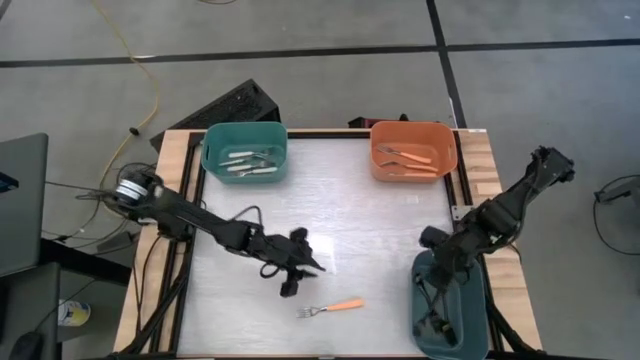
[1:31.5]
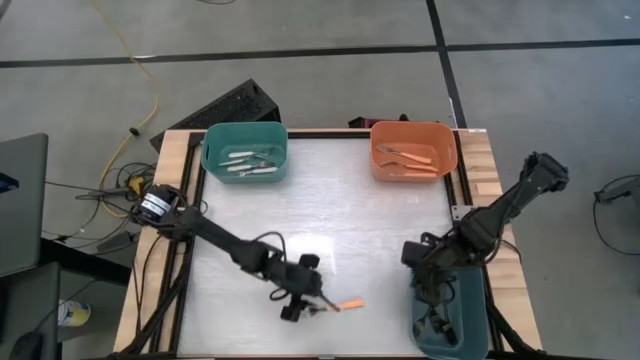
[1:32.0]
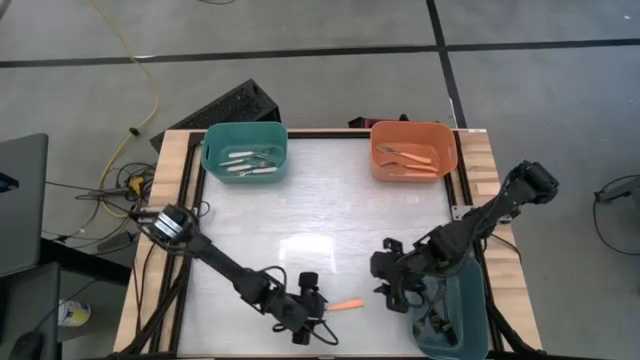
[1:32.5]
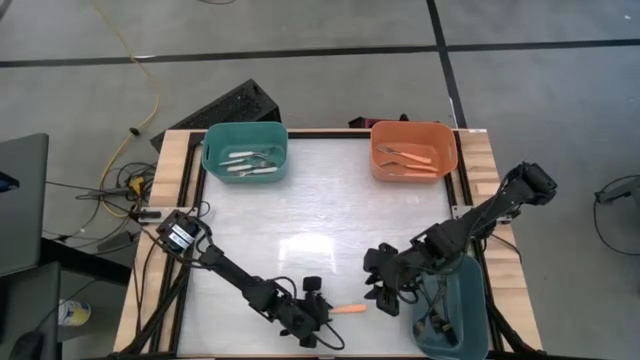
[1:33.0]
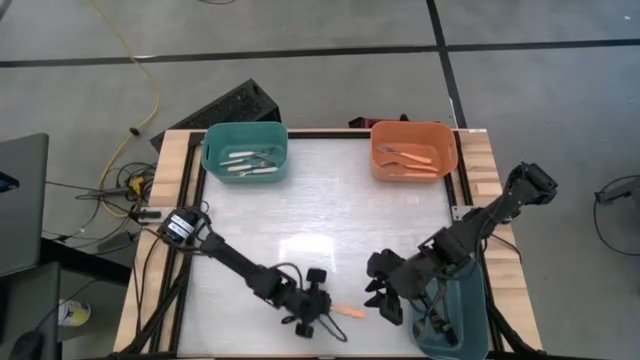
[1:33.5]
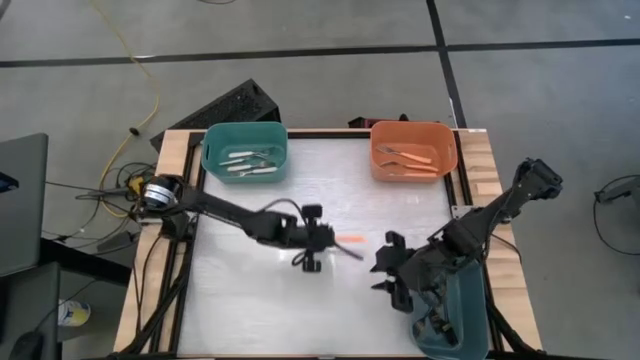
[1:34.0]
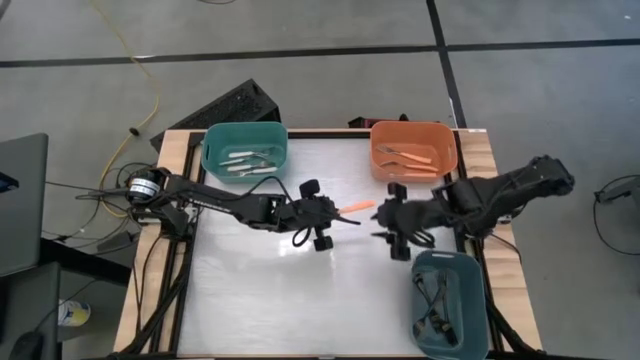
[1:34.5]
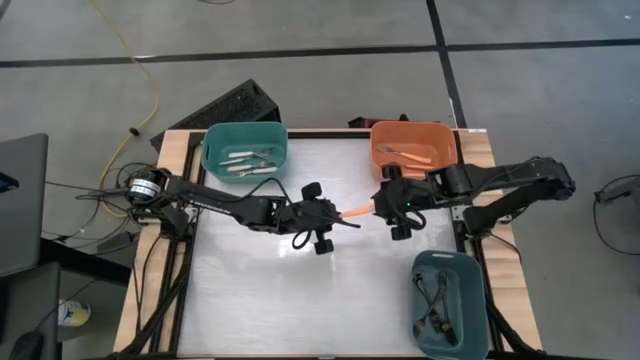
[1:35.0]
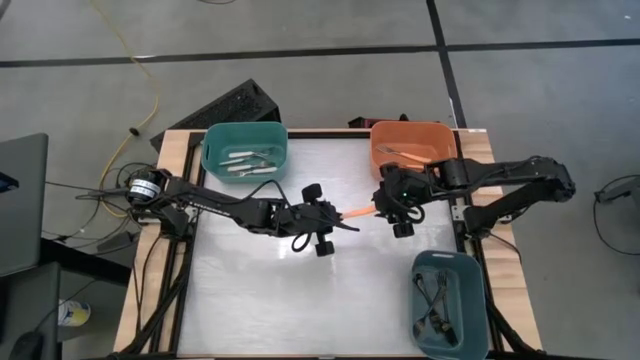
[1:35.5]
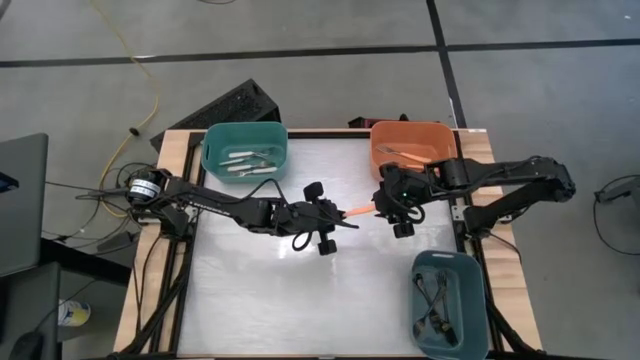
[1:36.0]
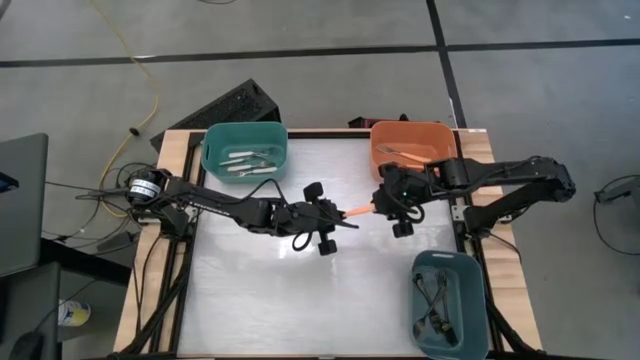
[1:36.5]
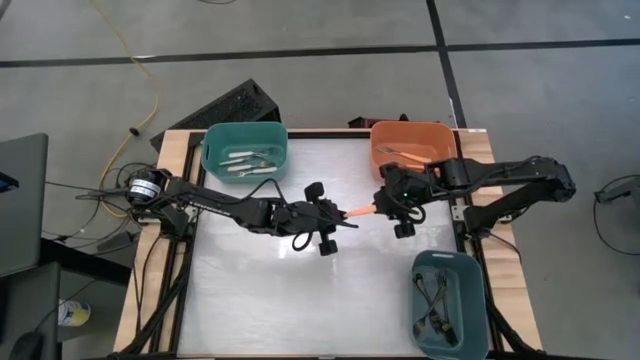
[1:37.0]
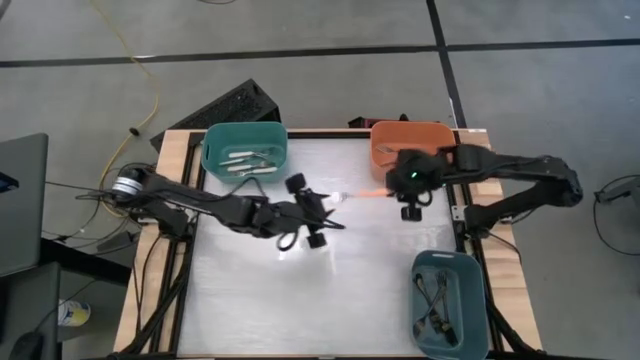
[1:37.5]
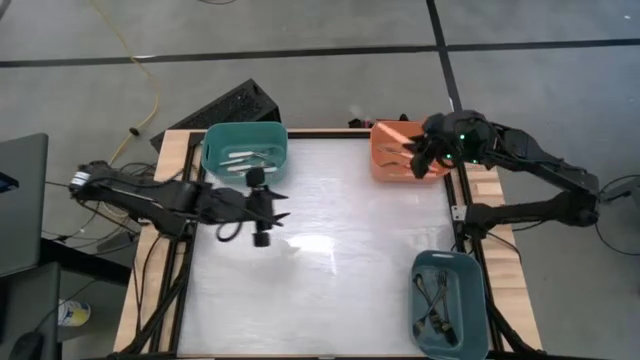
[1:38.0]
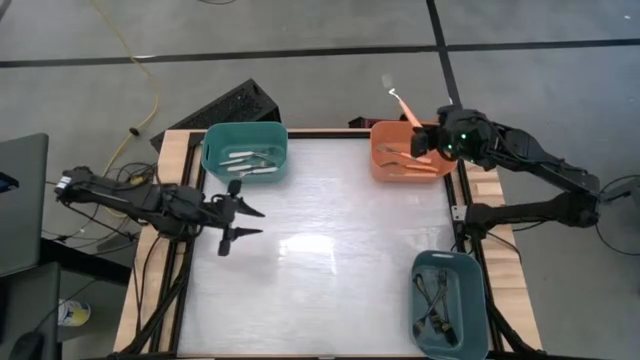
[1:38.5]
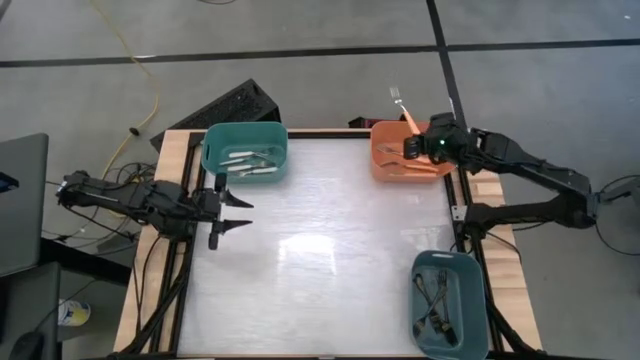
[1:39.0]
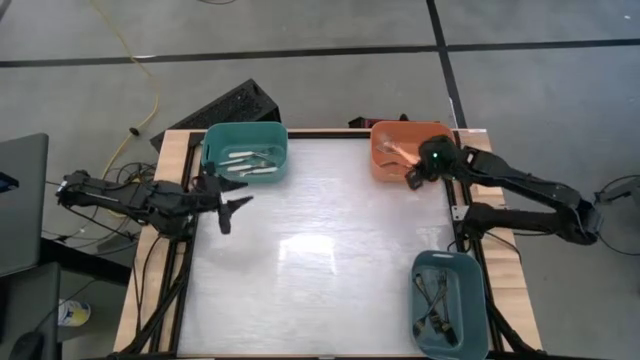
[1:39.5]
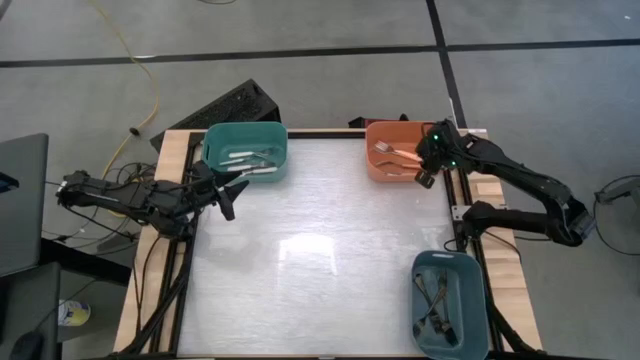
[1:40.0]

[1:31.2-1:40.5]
Task: Sort silverware by color (type)
Put the orange fork into the orange bin

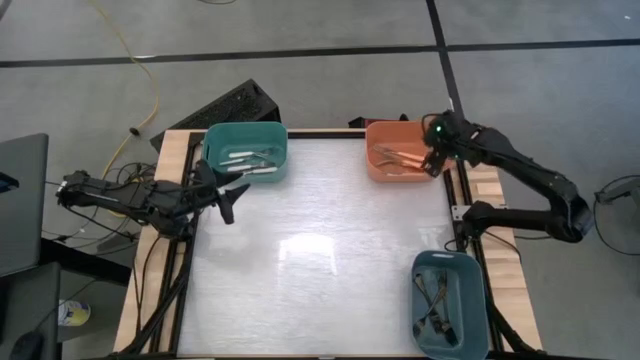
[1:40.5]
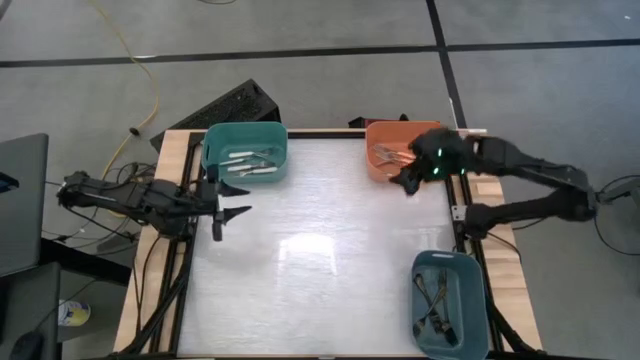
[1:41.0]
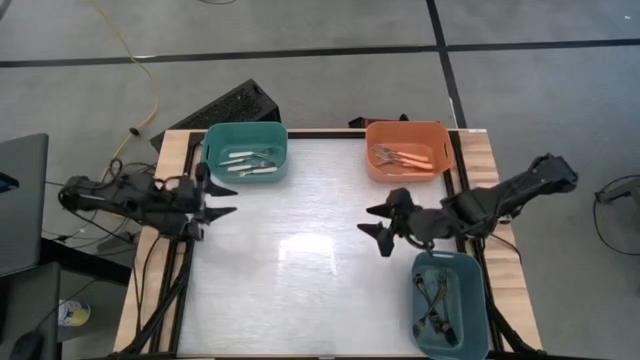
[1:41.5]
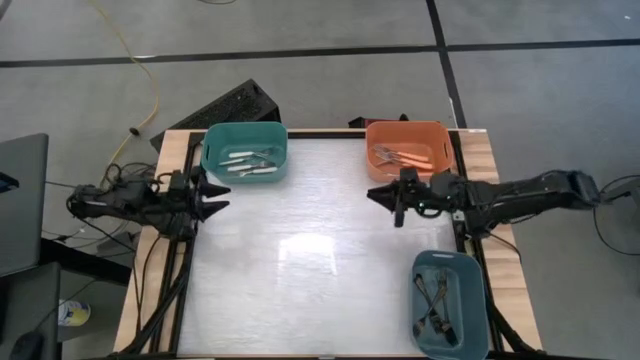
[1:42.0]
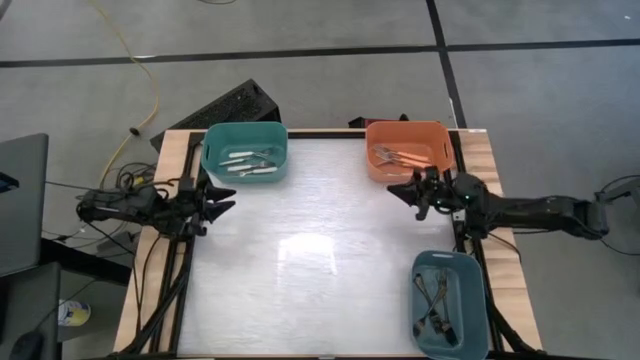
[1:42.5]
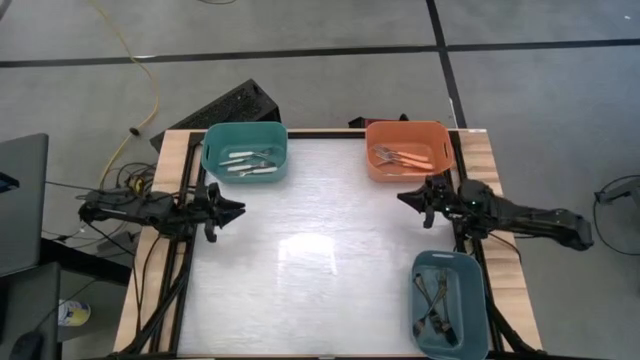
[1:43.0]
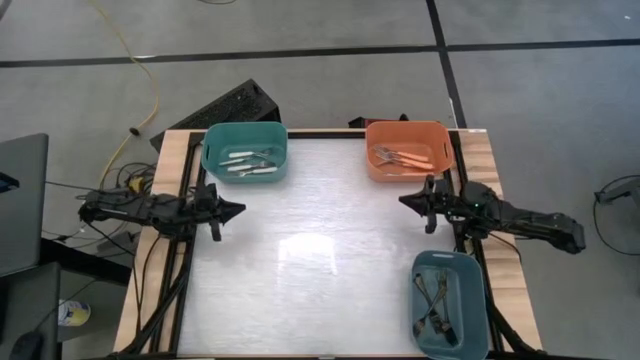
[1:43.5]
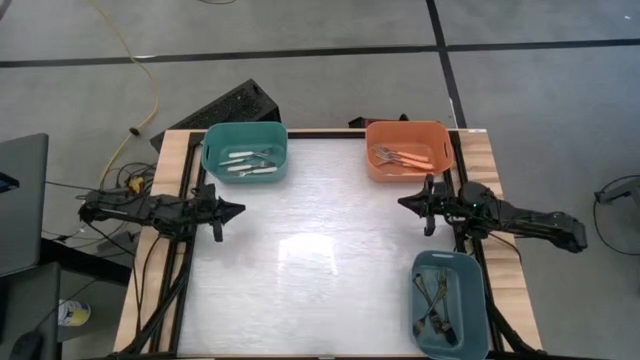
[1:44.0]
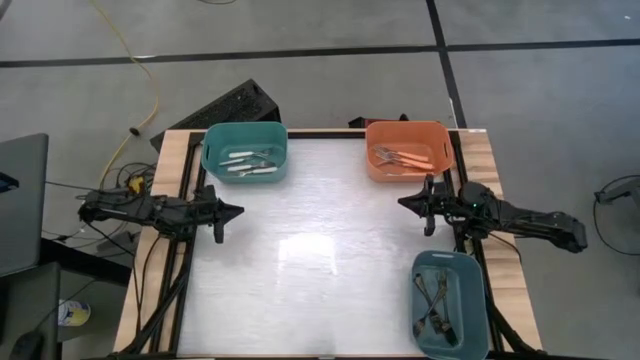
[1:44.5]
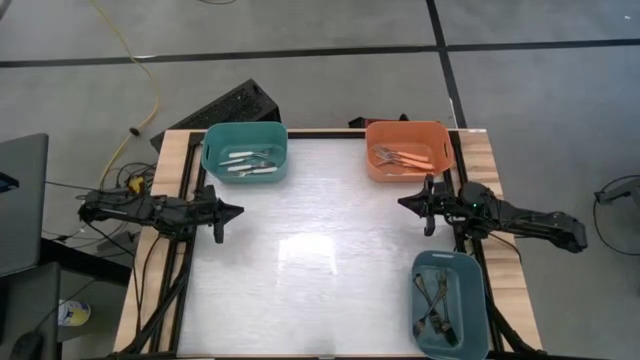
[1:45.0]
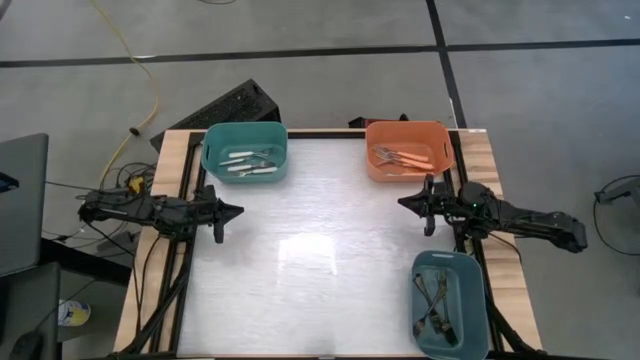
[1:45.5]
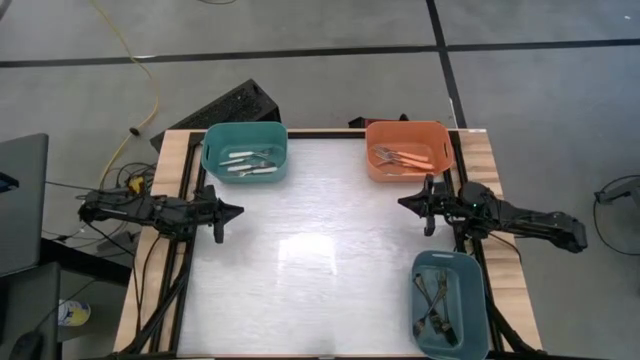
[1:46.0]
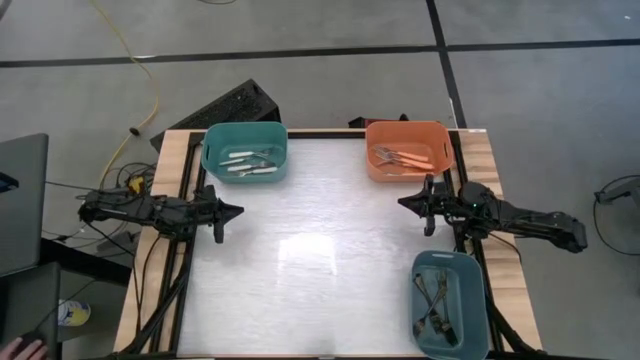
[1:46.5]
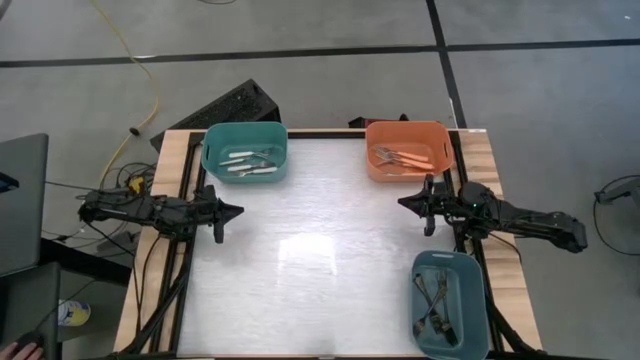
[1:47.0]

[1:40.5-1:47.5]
Return to Home Position

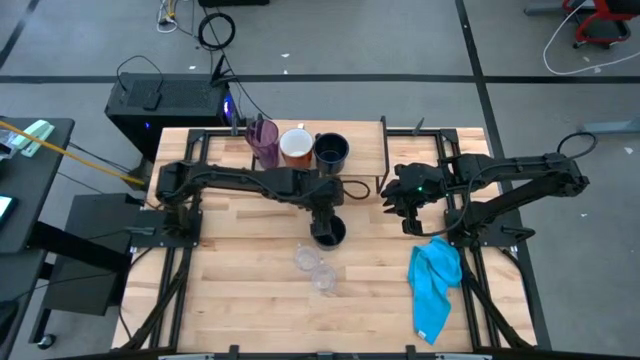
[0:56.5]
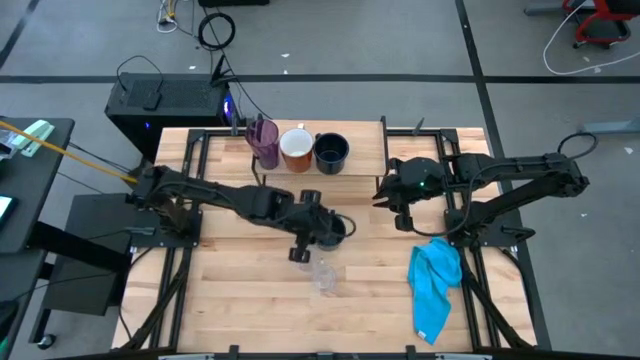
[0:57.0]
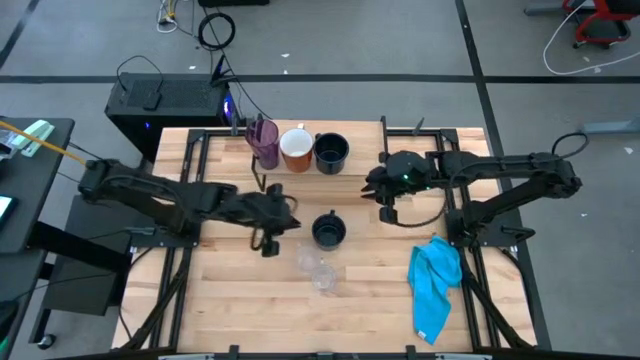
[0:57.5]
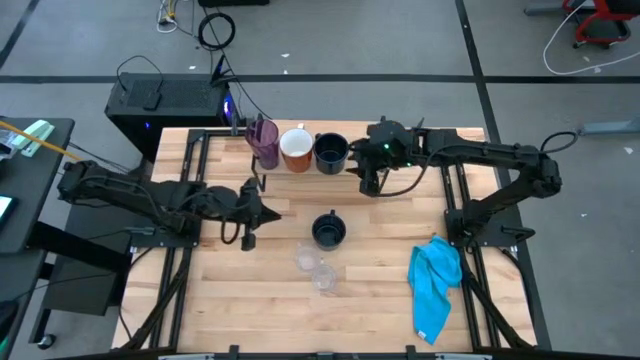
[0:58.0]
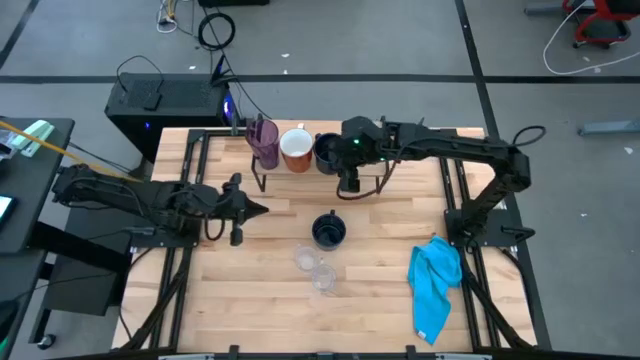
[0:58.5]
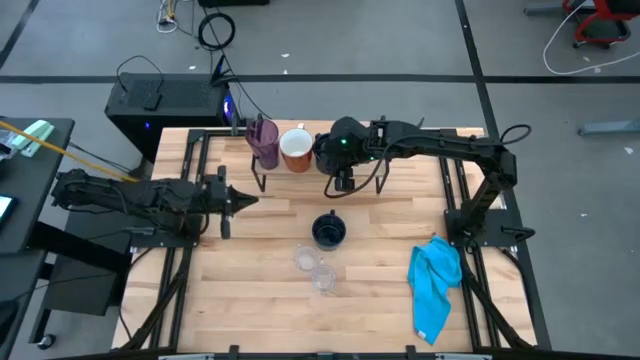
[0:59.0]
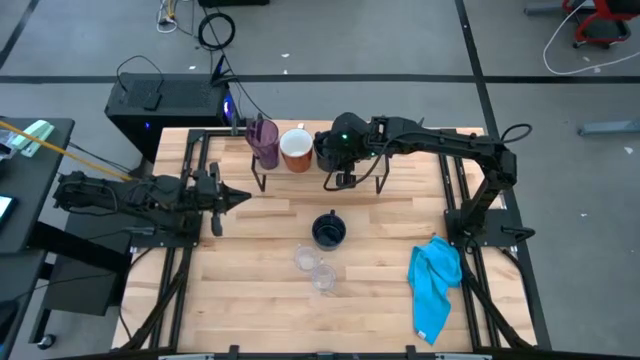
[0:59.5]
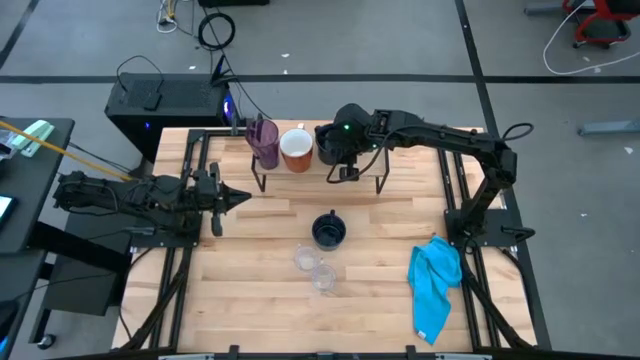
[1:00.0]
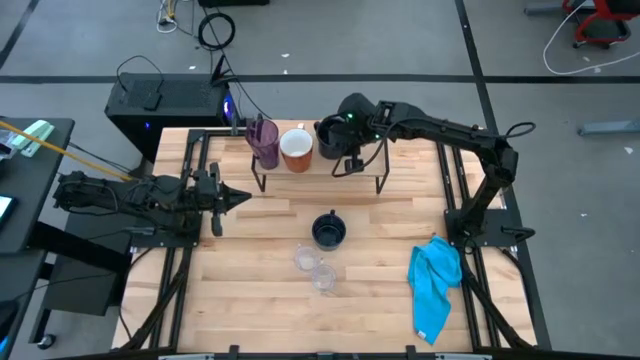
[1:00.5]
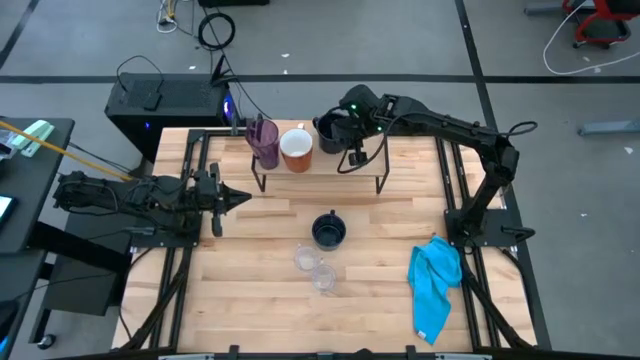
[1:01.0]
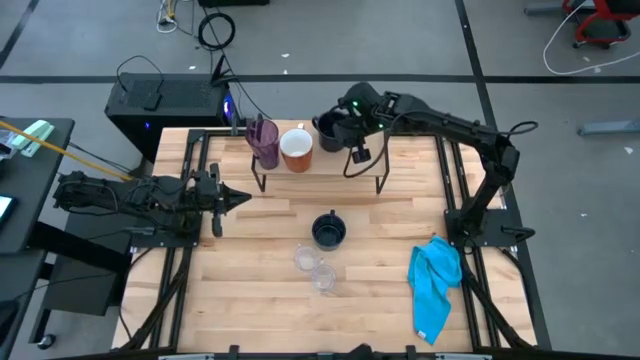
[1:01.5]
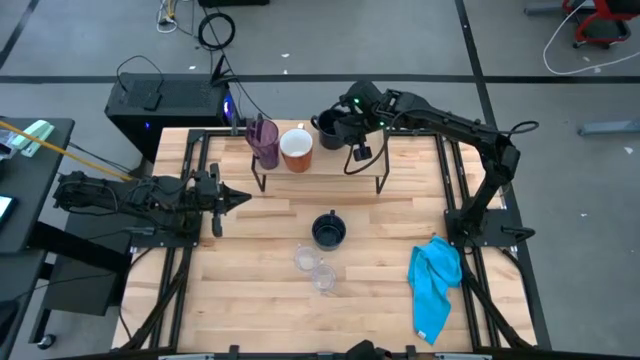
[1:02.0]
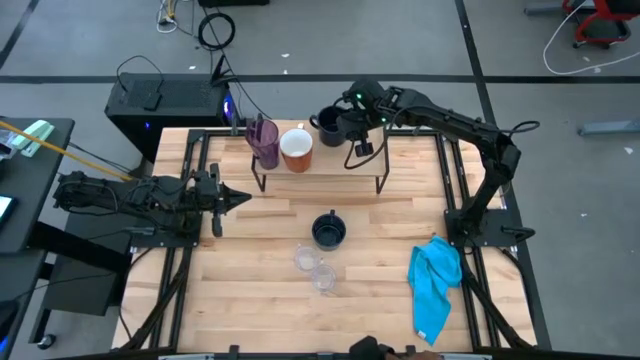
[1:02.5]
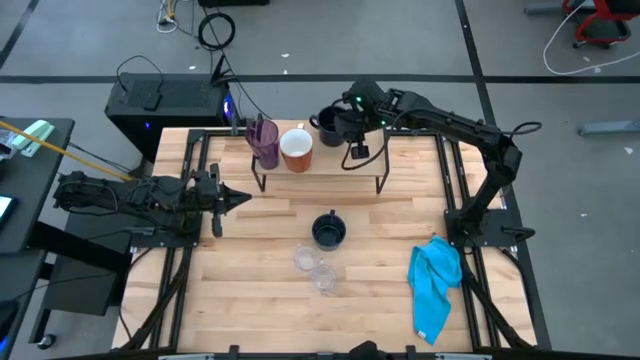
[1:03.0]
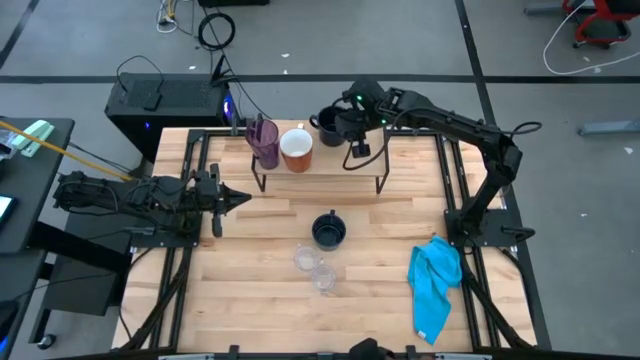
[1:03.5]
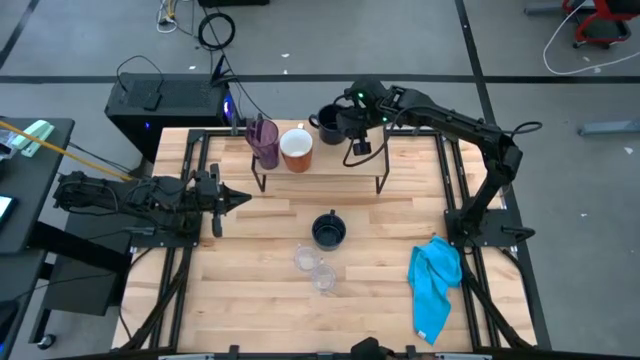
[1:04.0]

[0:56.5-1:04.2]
Task: Stack small to large cups/mugs on shelf
Adjust the dark blue mug on the shelf
